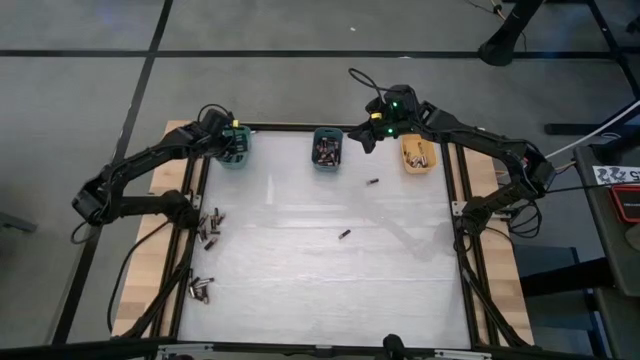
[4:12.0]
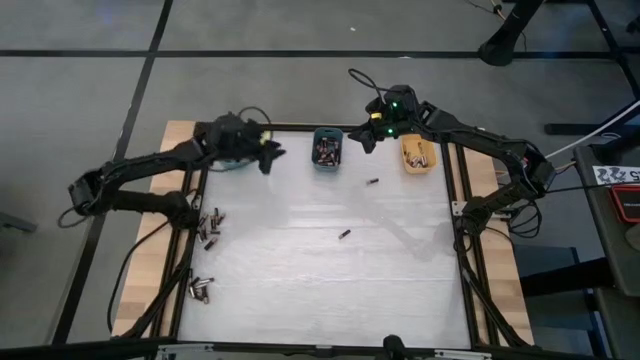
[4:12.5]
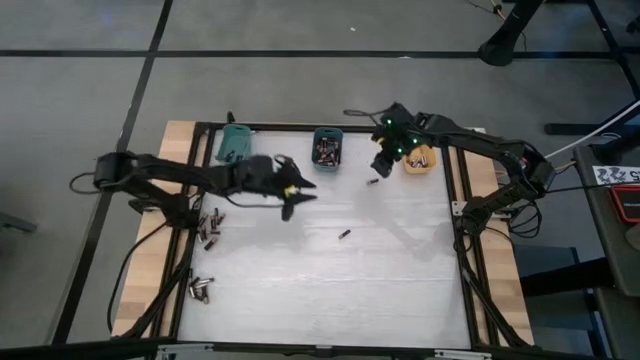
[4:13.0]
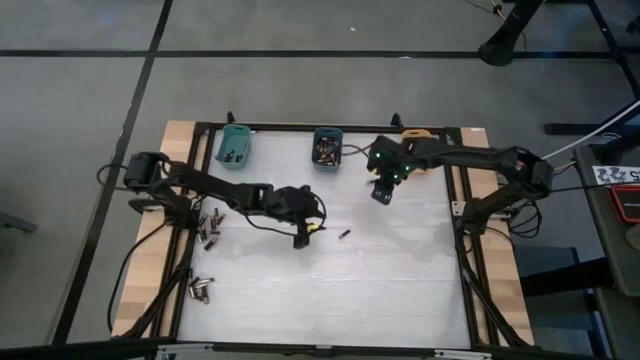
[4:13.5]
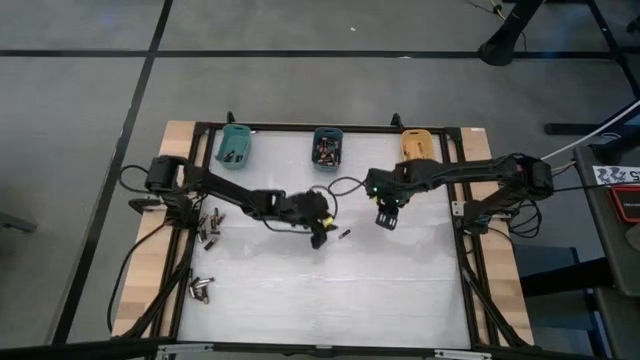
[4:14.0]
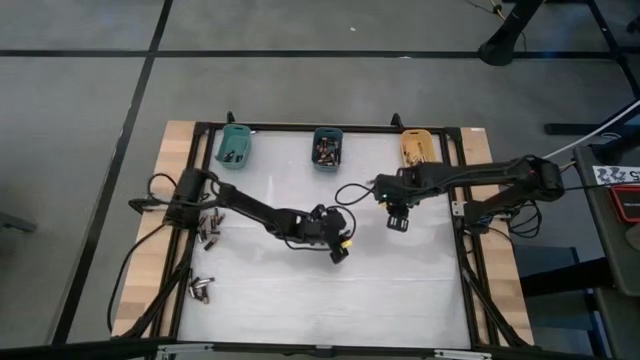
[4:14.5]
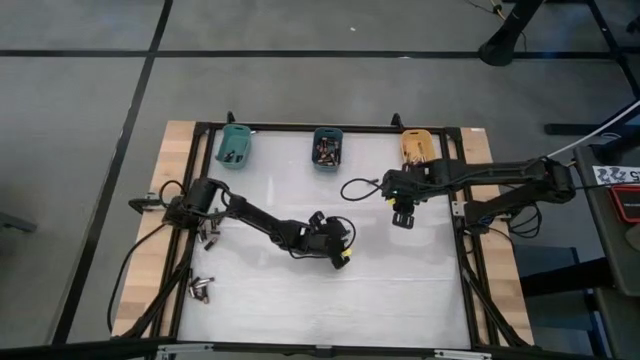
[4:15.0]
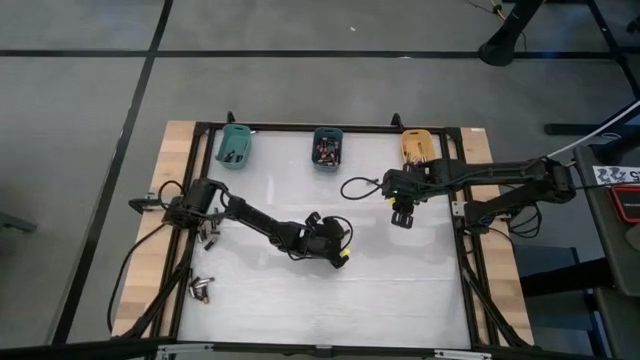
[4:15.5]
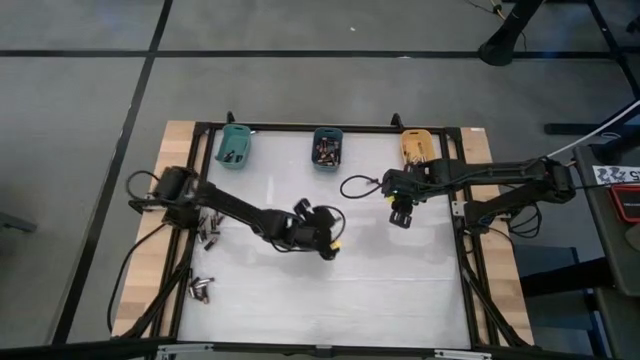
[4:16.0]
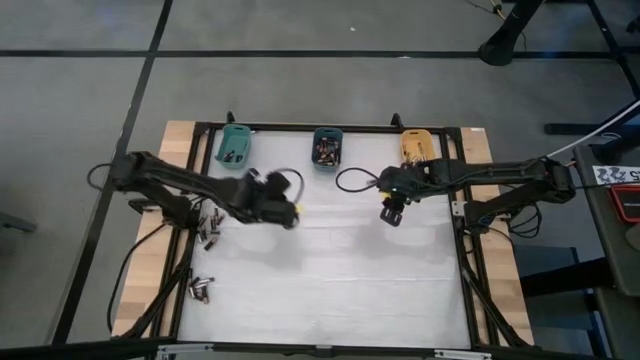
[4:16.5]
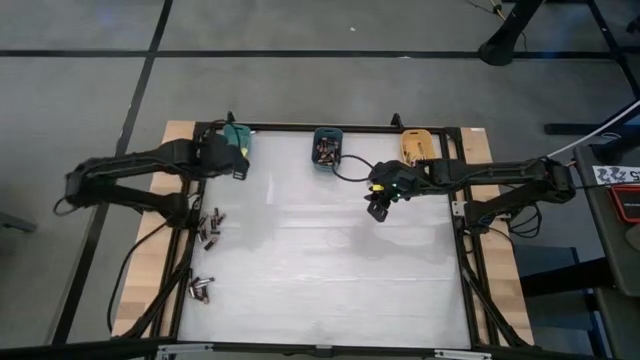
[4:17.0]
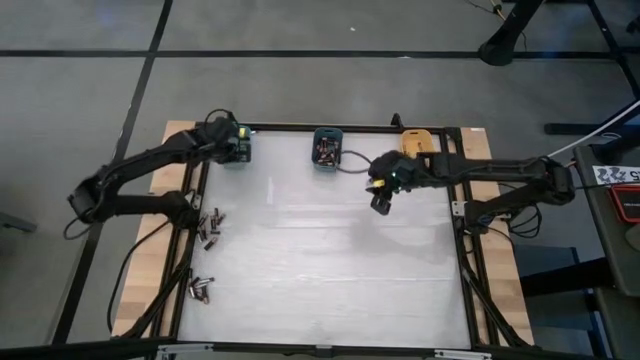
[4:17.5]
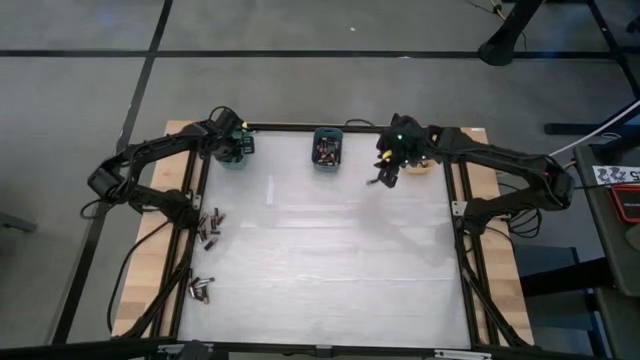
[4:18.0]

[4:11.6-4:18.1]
Task: Sort batteries
Put the brown battery into the green bin

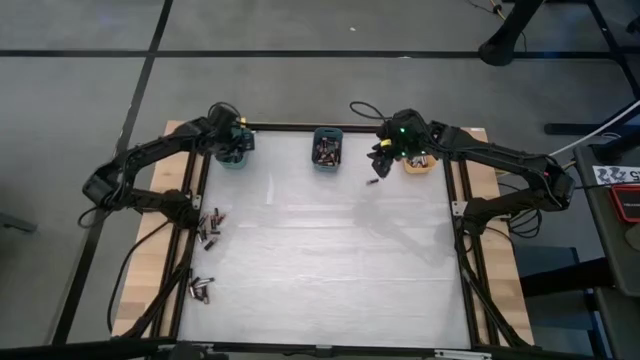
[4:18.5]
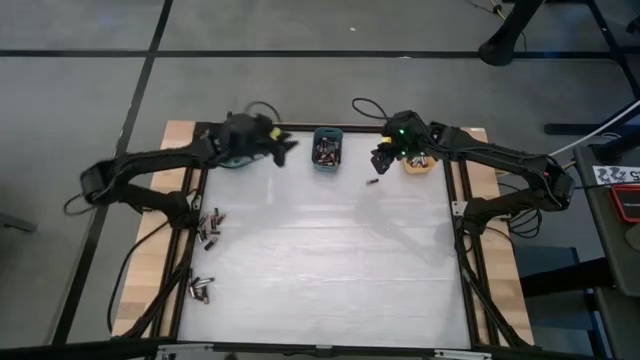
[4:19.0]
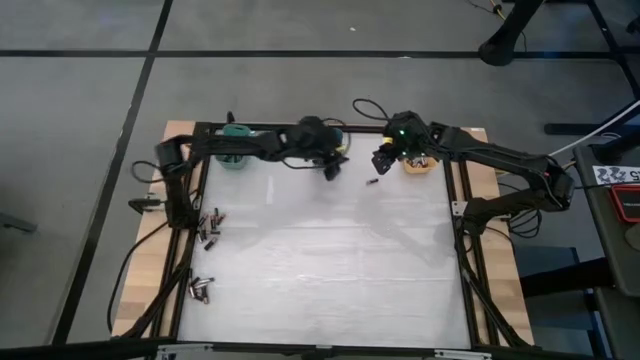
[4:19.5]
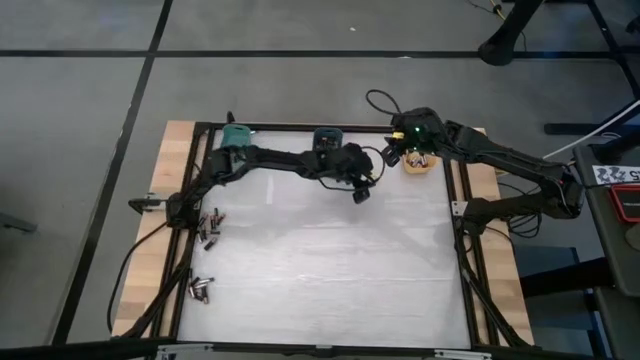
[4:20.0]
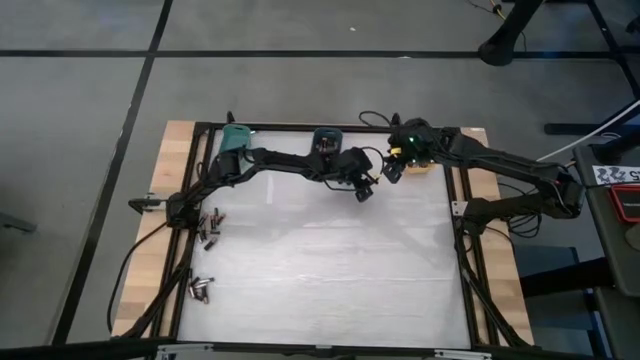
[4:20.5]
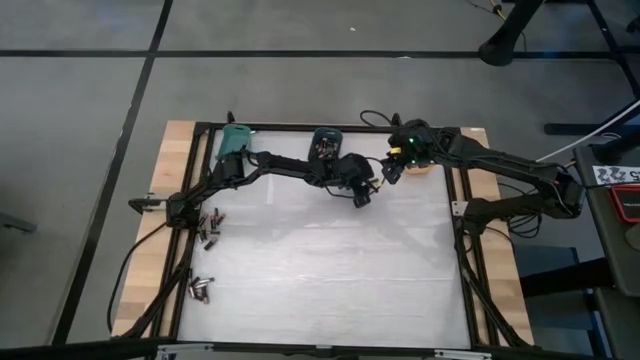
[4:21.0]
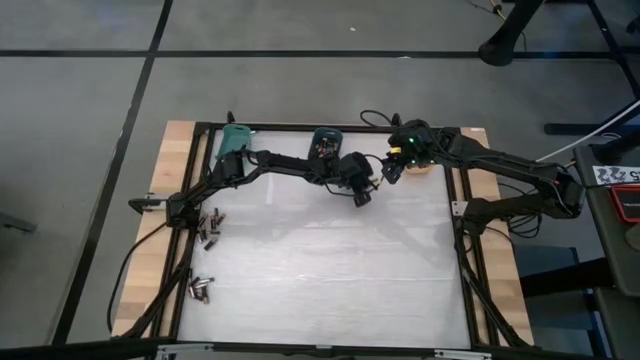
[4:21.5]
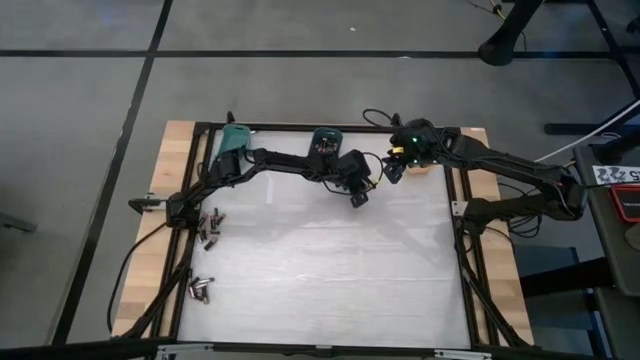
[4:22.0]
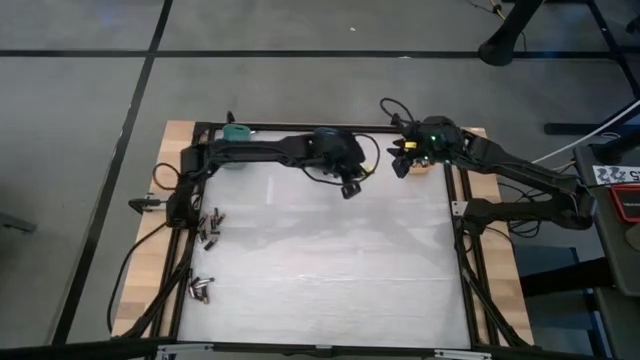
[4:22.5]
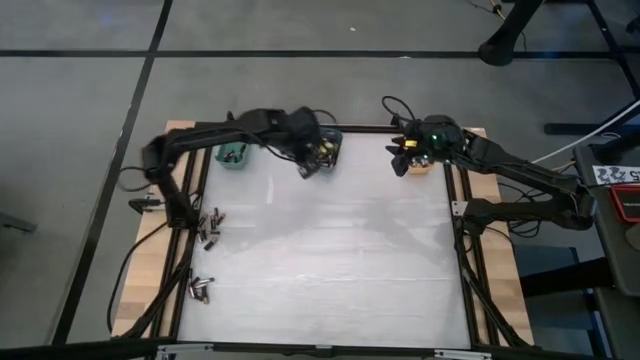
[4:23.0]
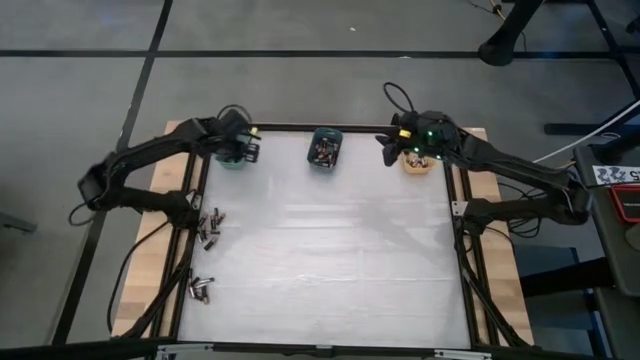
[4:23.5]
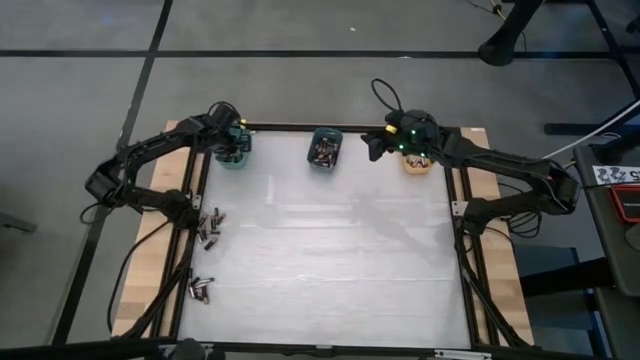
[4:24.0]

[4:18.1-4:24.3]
Put the brown battery into the green bin

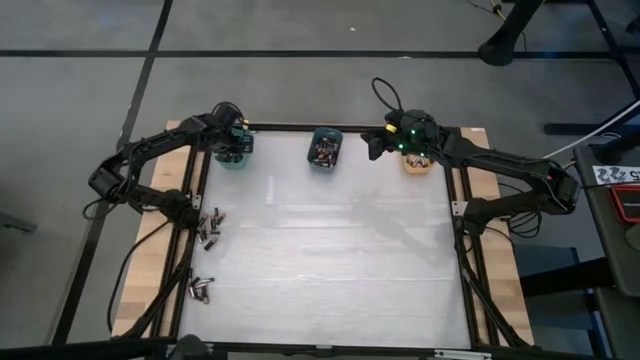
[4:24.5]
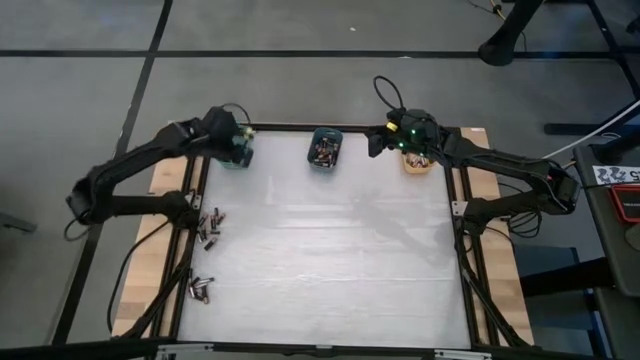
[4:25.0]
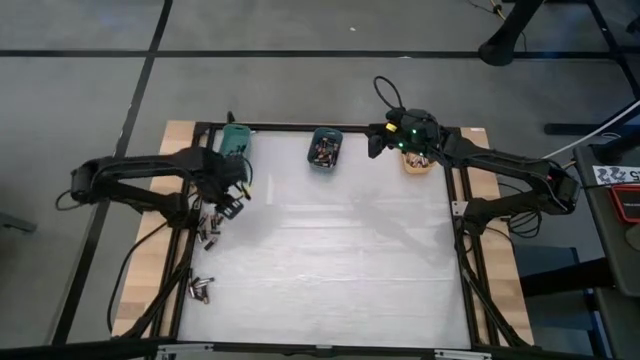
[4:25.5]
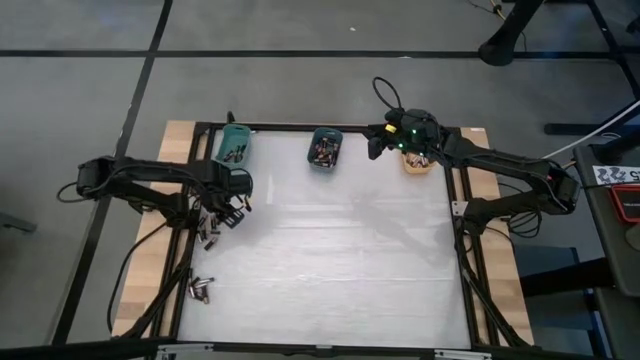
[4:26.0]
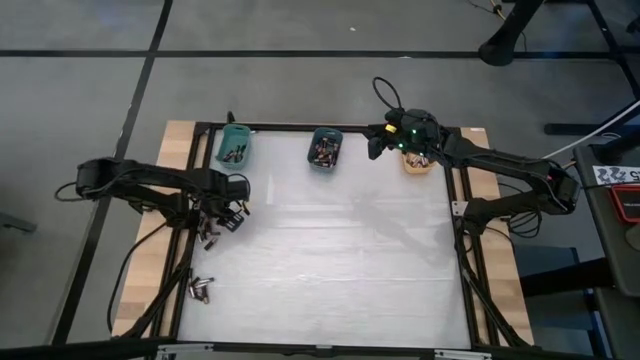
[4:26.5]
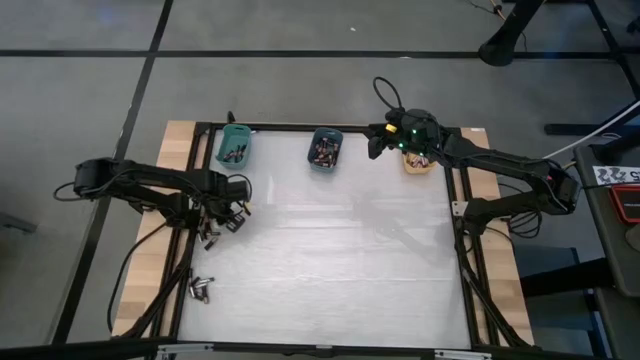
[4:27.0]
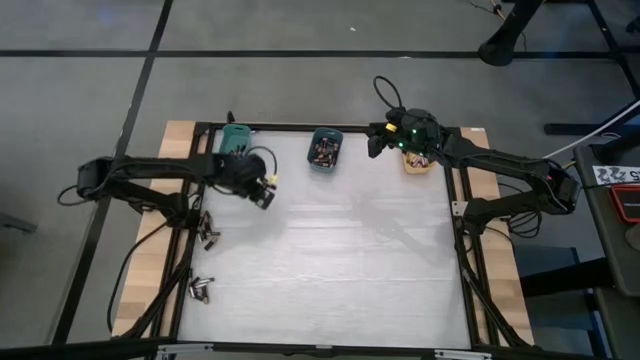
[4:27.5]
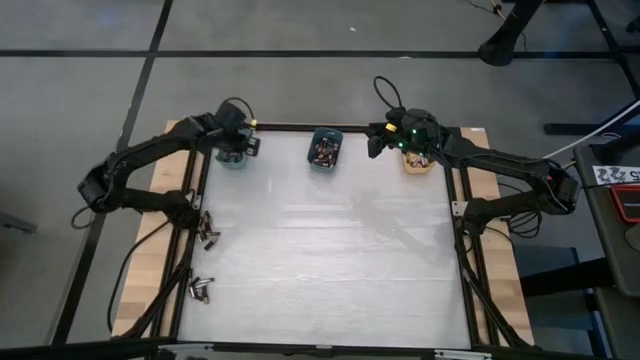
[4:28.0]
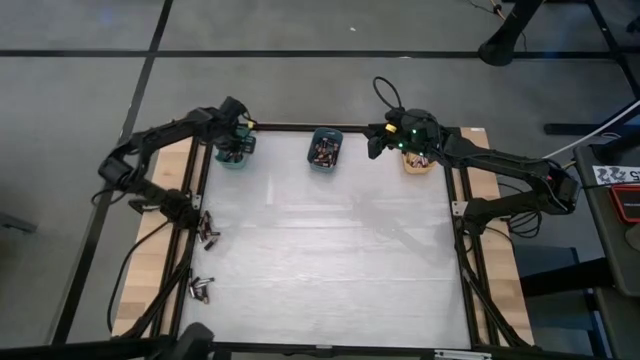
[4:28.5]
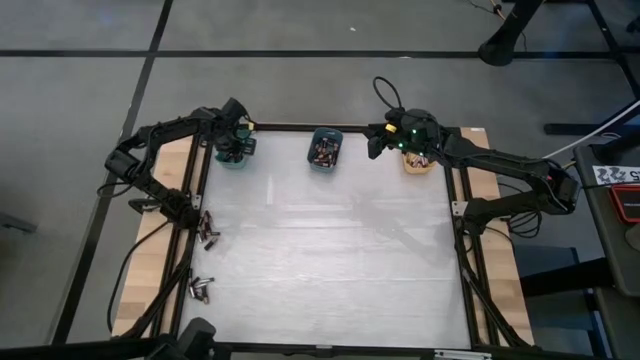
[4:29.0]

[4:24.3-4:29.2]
Put the brown battery into the green bin

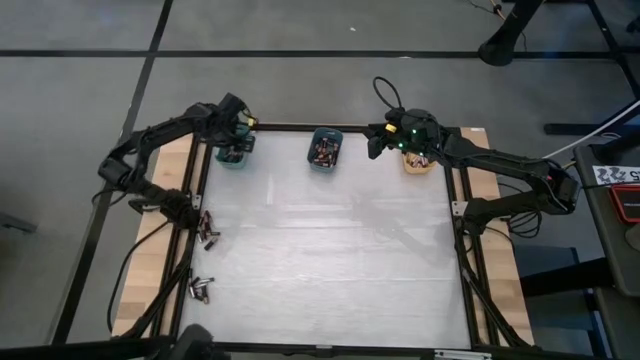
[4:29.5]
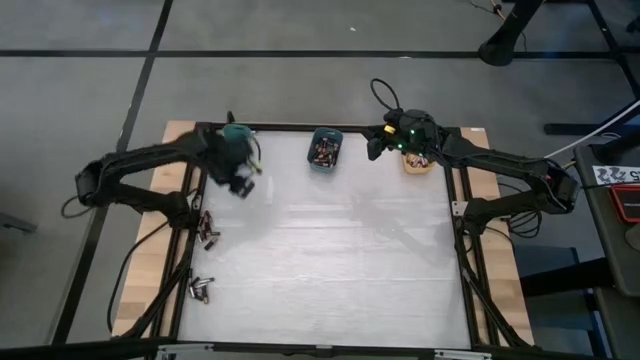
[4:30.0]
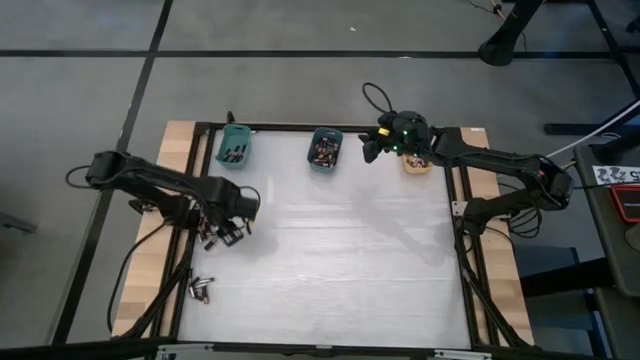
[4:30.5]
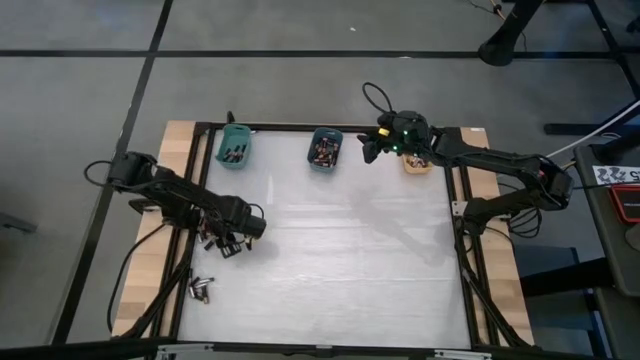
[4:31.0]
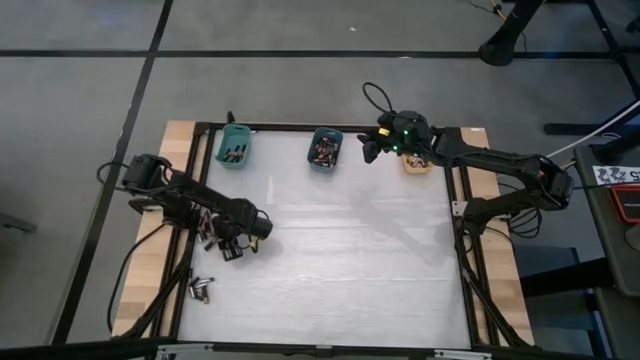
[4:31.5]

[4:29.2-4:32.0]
Put the brown battery into the blue bin
